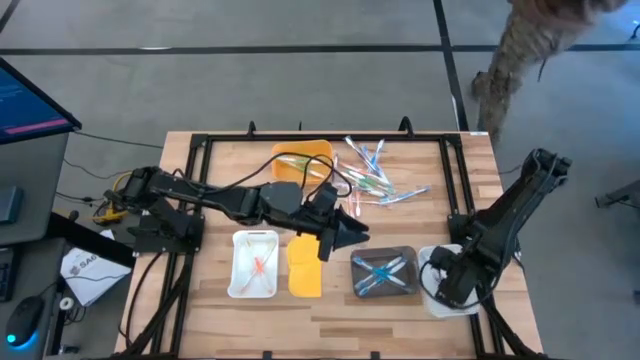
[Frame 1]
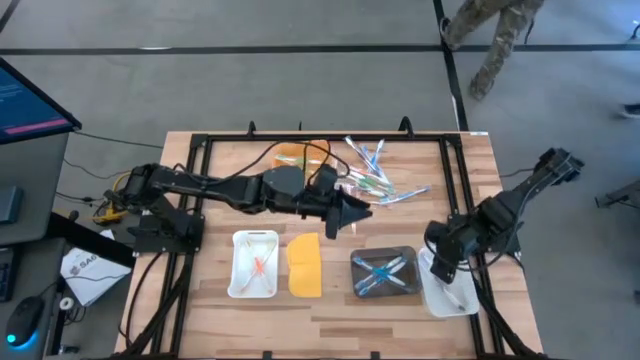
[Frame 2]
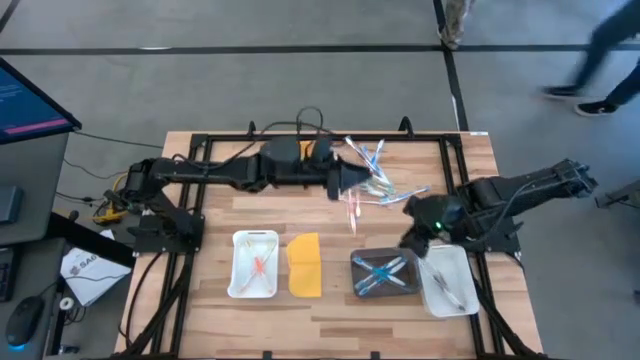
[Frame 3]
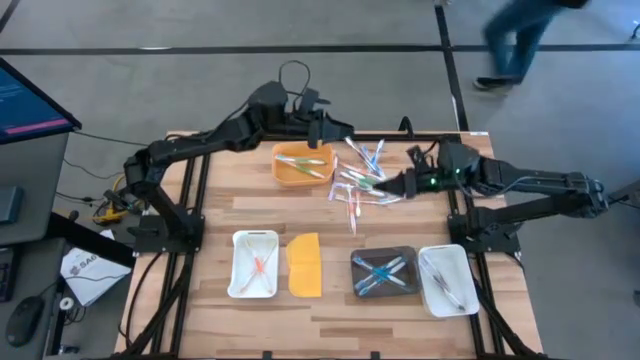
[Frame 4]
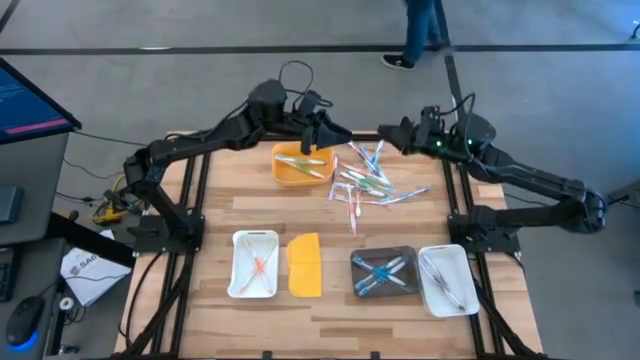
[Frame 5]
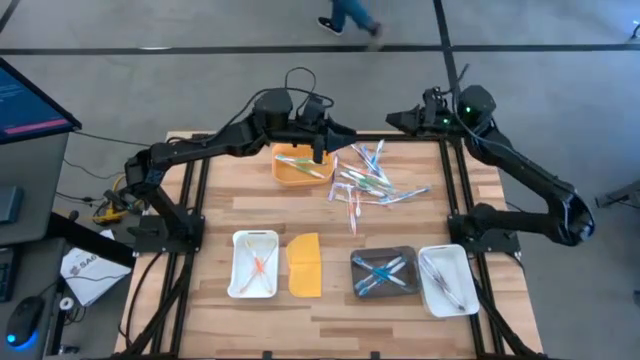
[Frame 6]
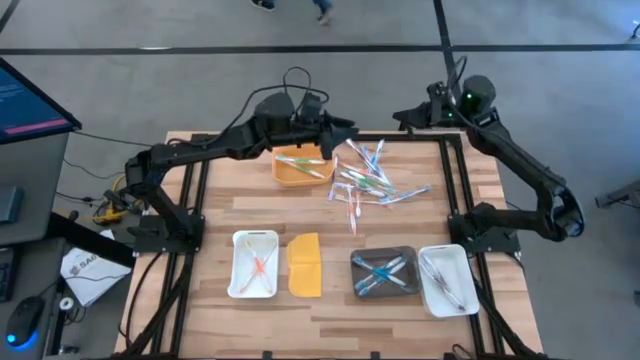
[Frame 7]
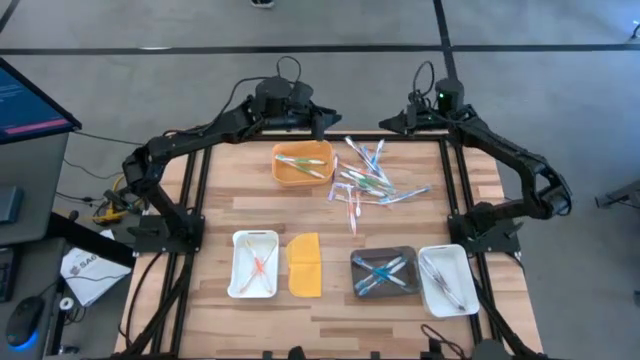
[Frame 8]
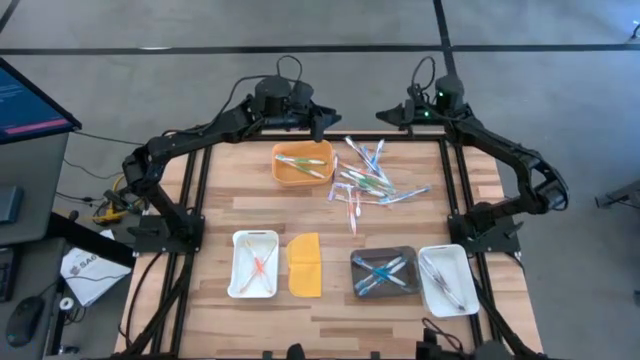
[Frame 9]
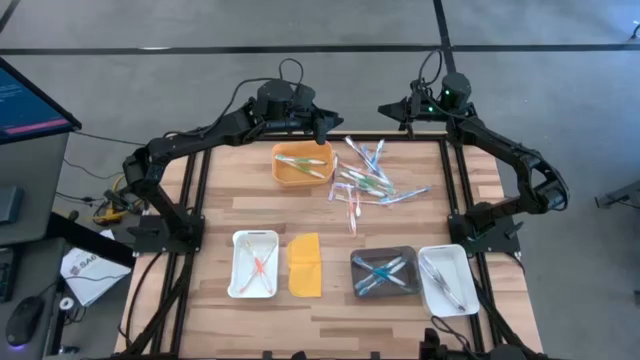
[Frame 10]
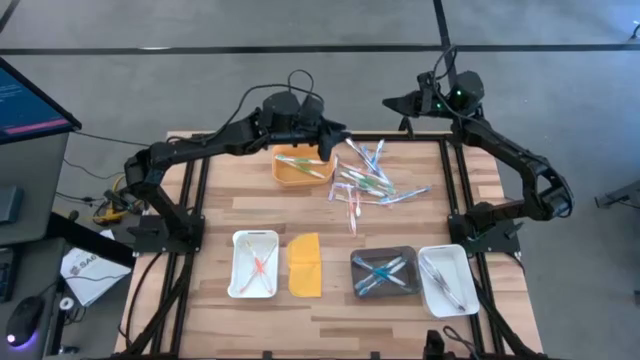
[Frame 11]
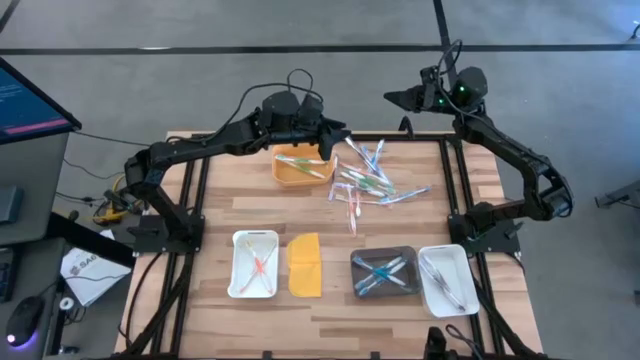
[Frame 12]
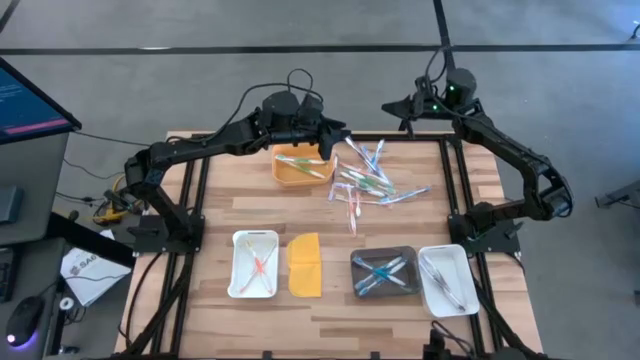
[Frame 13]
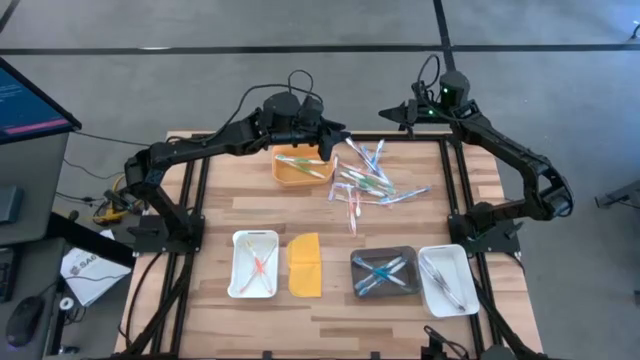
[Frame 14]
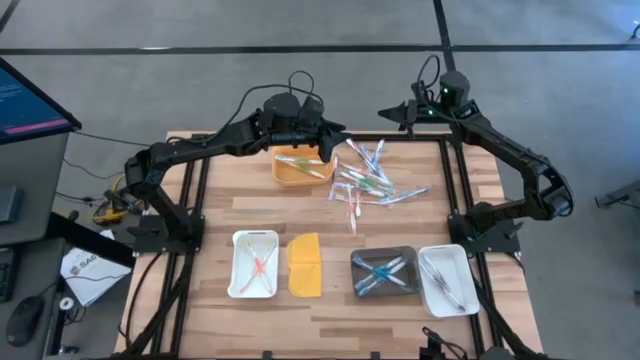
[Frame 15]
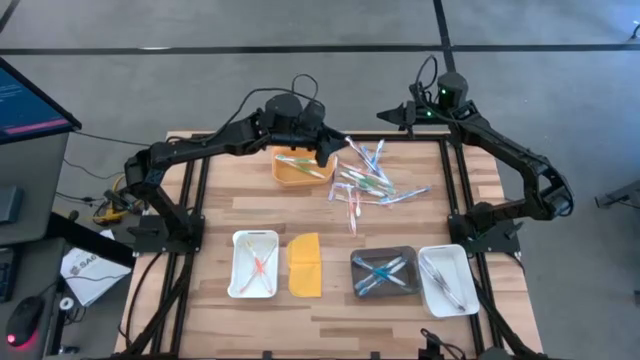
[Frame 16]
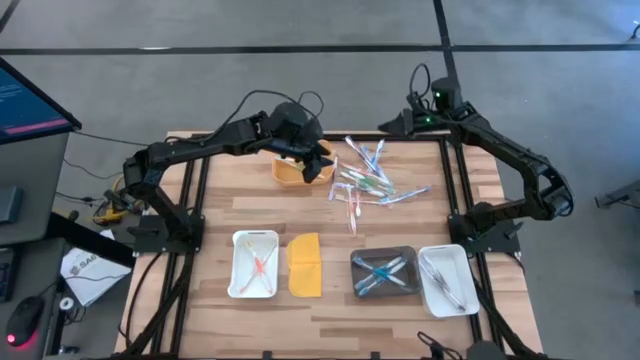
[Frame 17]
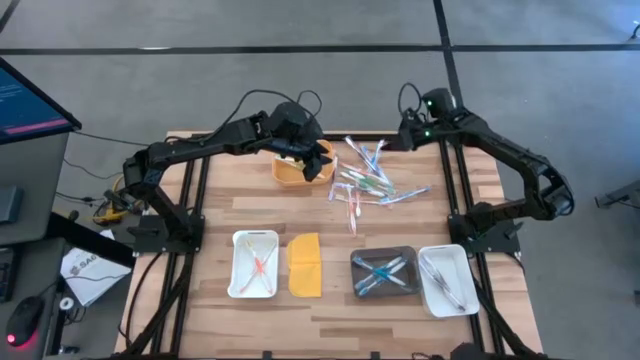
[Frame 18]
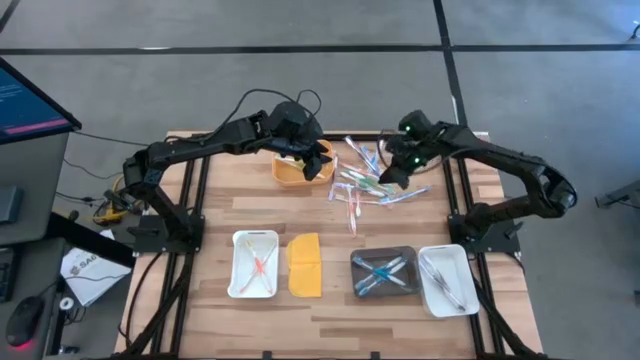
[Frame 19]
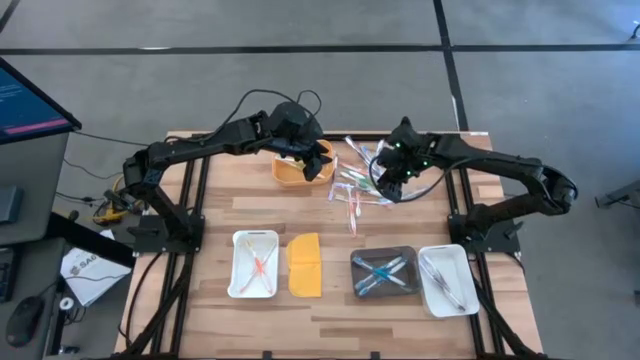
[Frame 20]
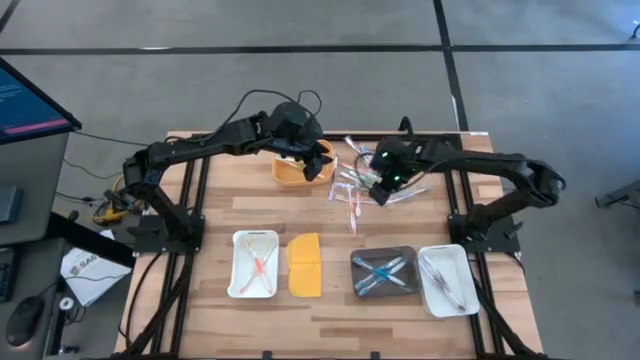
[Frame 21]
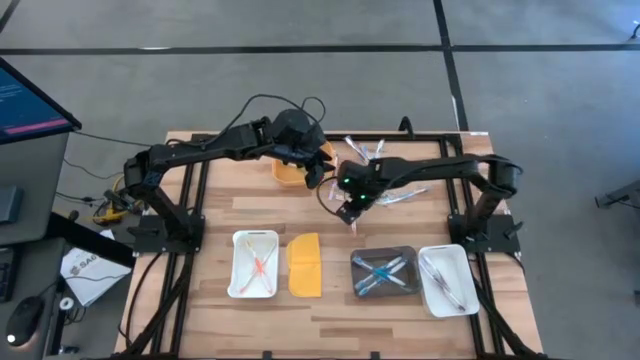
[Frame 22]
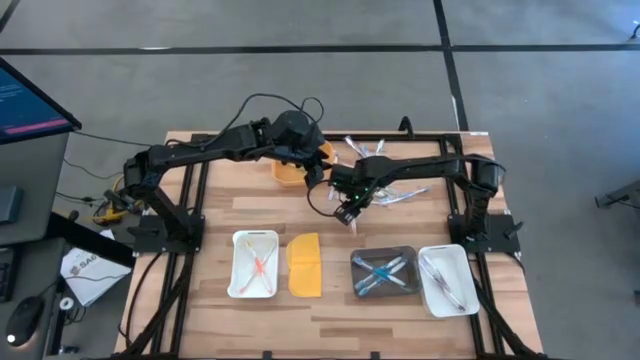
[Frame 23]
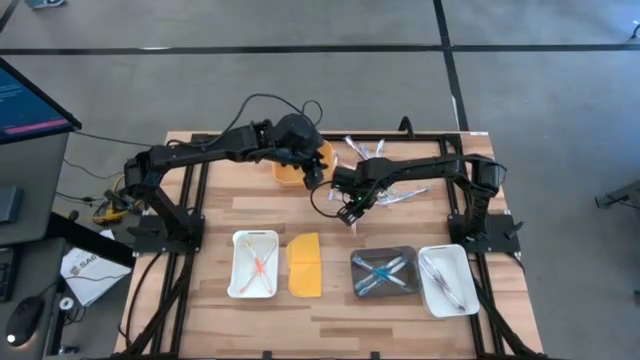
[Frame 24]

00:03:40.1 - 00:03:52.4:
Task: Pick & Place Toothbrushes
Put the orange toothbrush into the left white bin

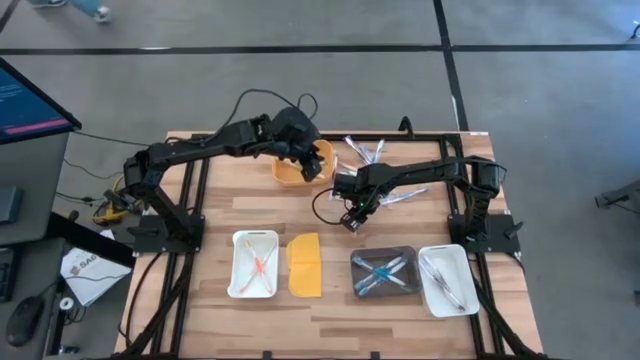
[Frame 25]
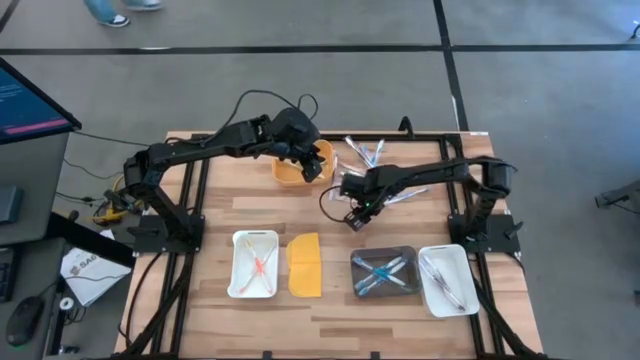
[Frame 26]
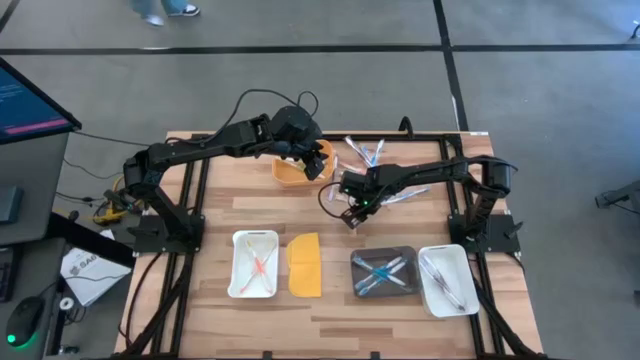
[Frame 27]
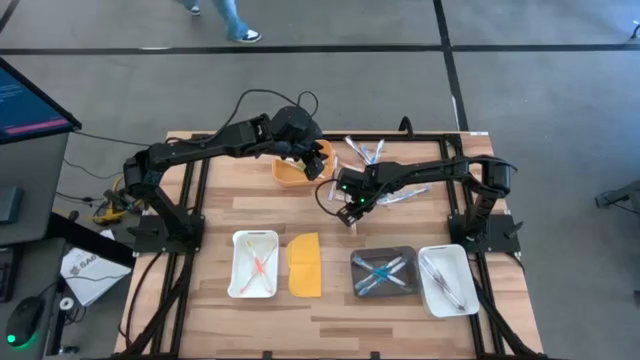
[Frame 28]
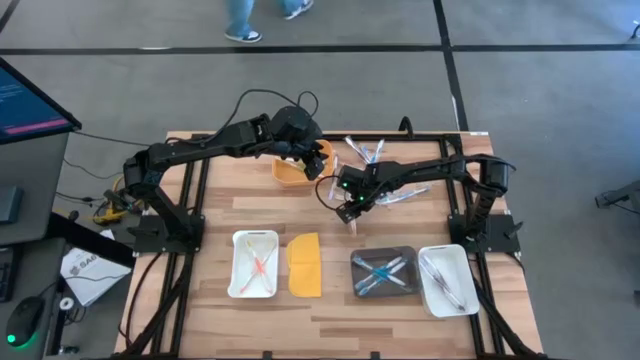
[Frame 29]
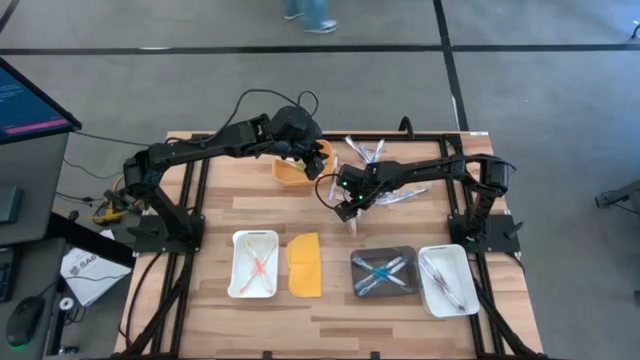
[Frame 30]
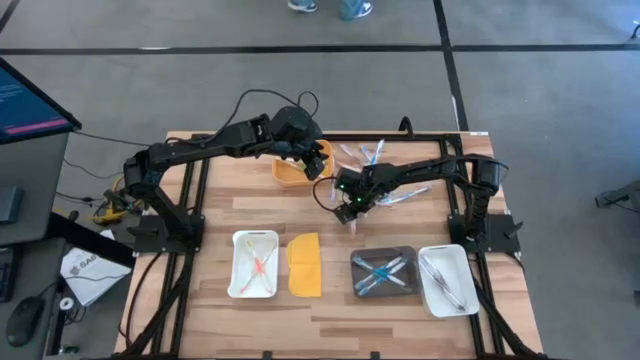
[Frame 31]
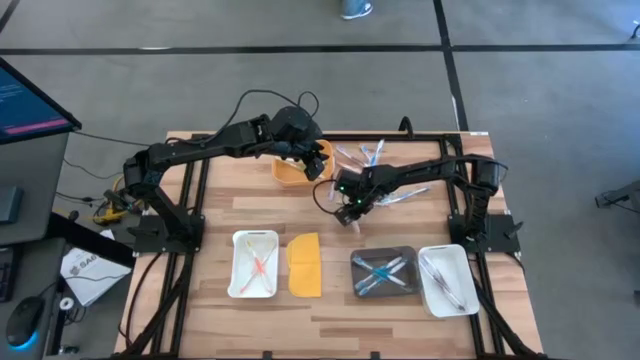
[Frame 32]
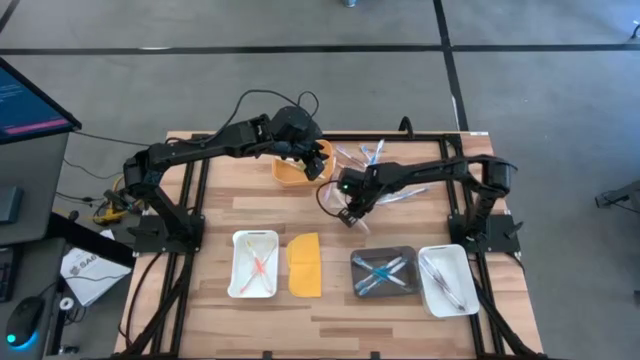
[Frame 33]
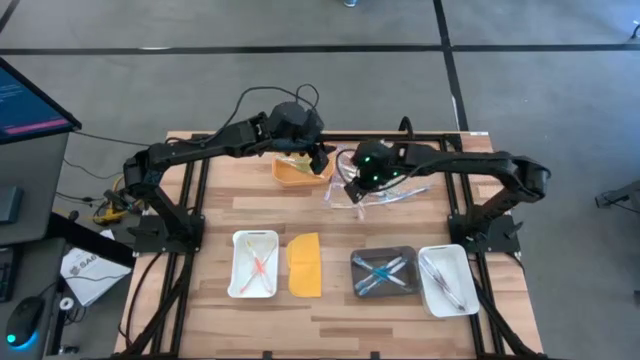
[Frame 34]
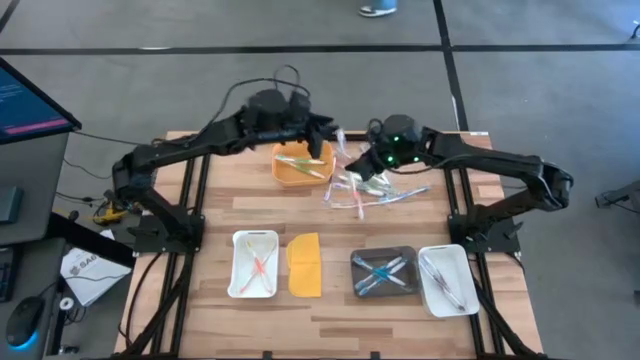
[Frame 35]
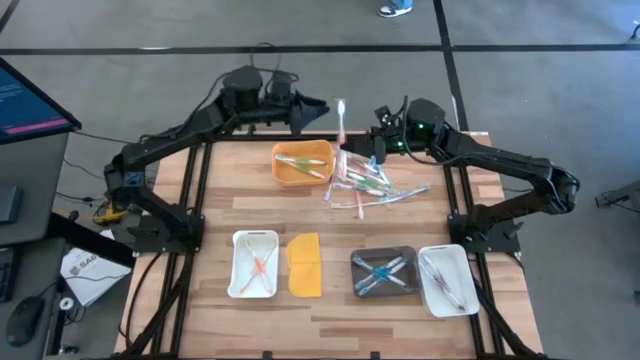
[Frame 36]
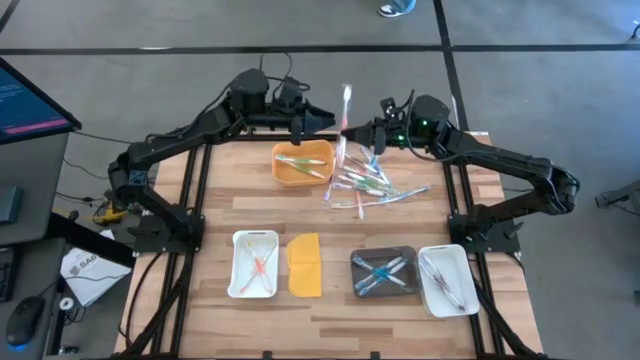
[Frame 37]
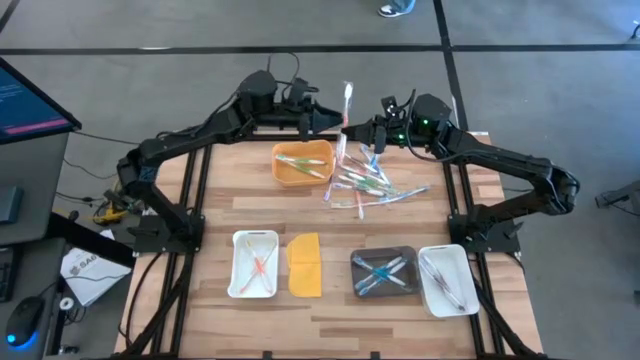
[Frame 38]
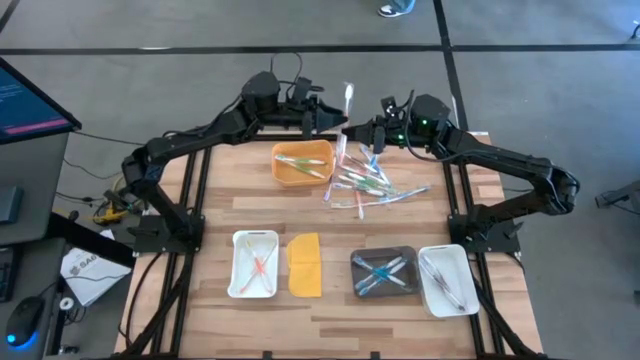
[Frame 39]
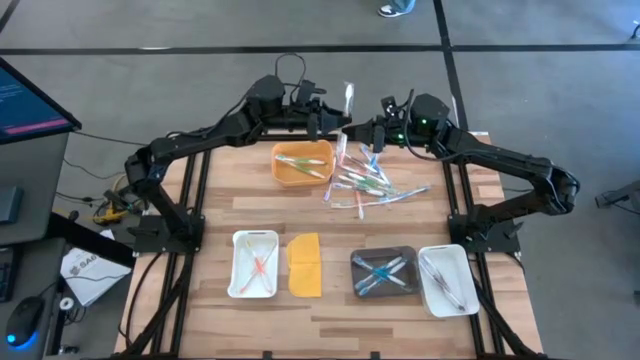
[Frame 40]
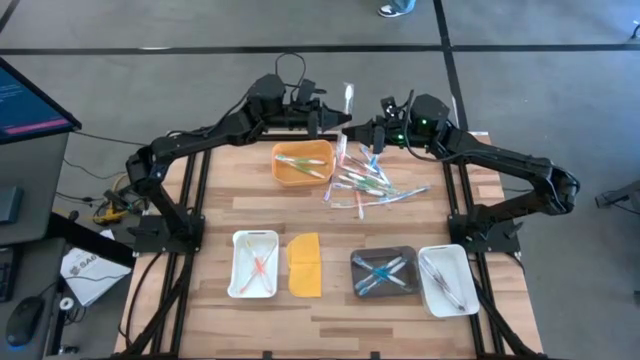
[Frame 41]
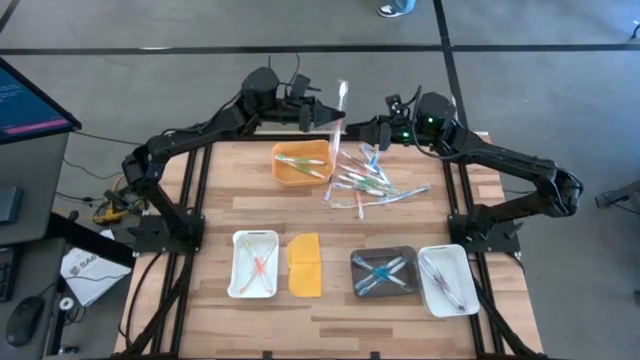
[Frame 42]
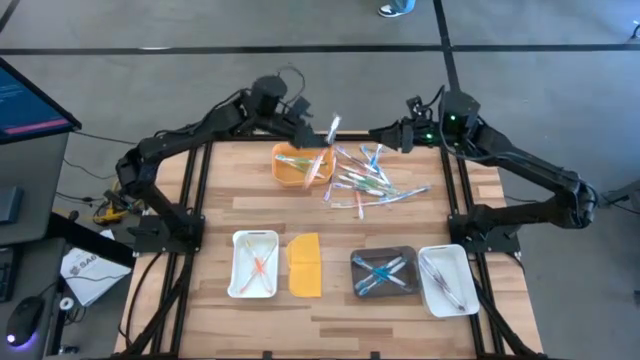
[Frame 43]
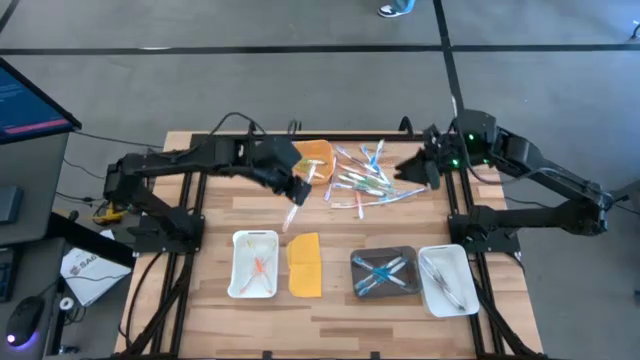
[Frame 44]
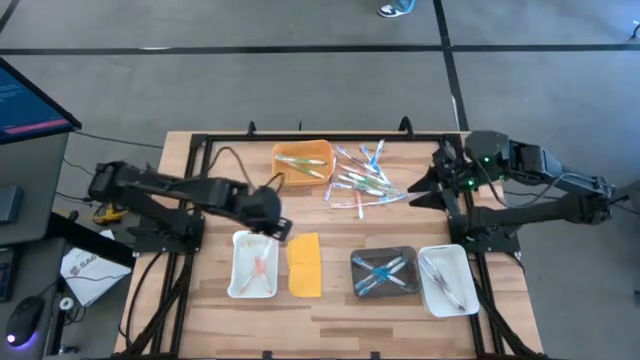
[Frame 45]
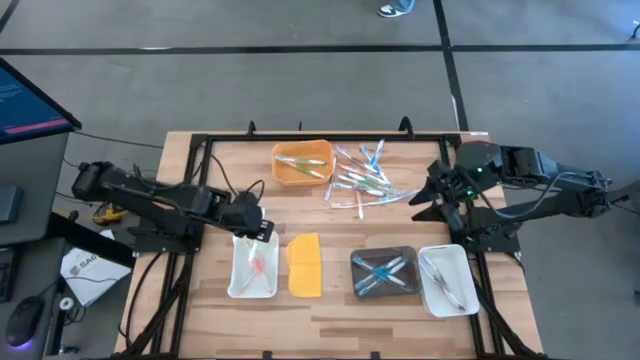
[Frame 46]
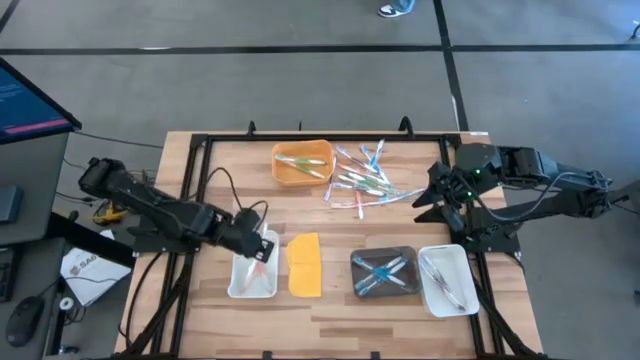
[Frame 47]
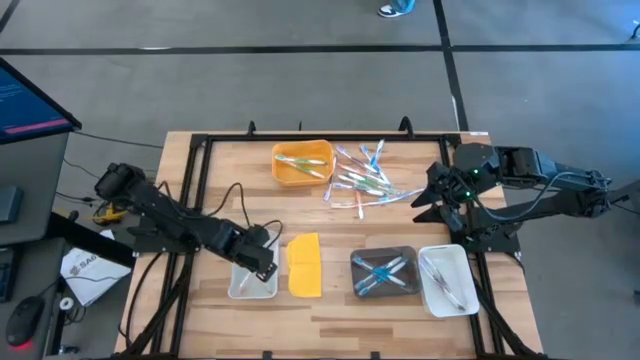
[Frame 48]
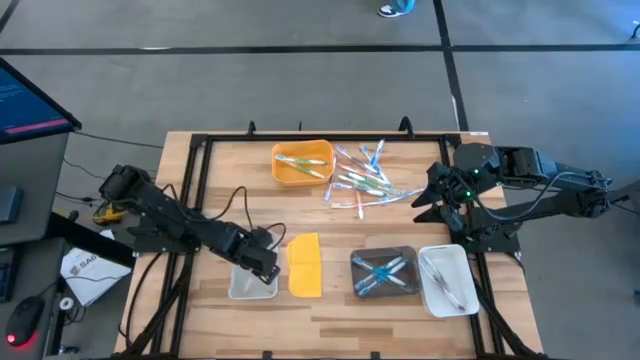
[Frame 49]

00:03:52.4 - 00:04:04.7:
Put the orange toothbrush into the left white bin
